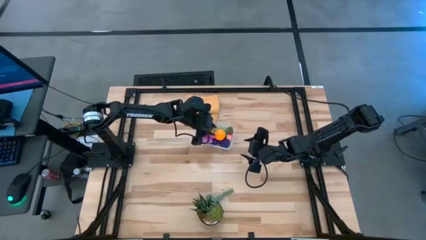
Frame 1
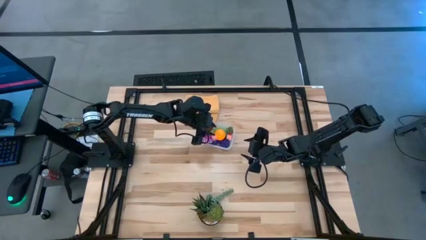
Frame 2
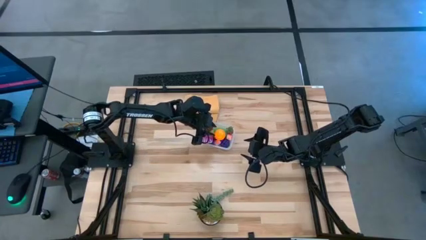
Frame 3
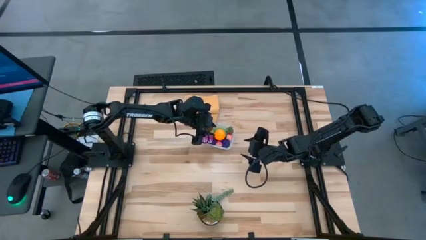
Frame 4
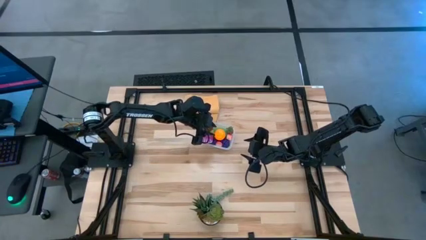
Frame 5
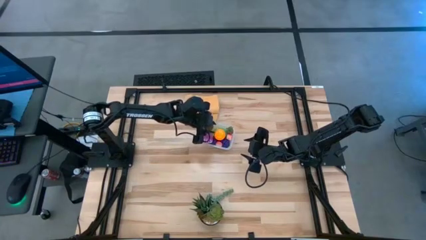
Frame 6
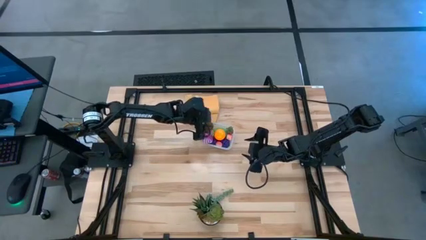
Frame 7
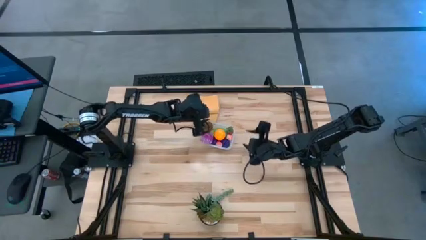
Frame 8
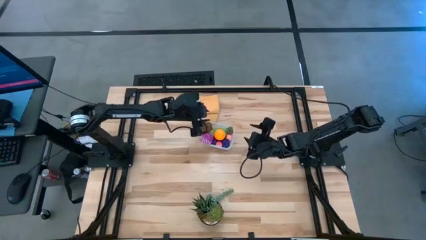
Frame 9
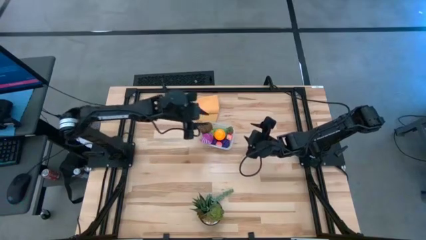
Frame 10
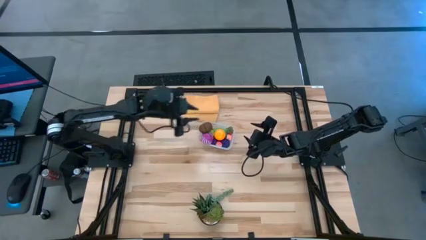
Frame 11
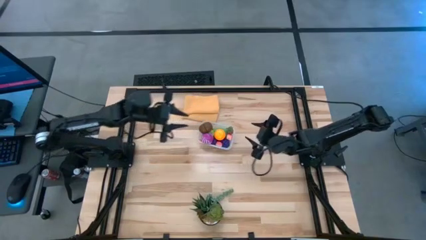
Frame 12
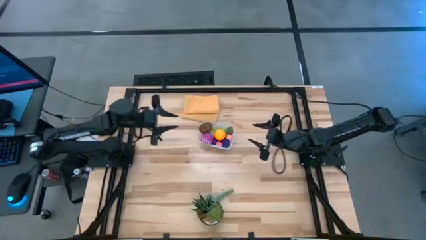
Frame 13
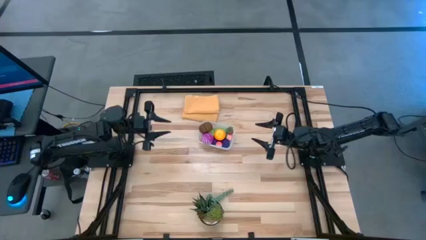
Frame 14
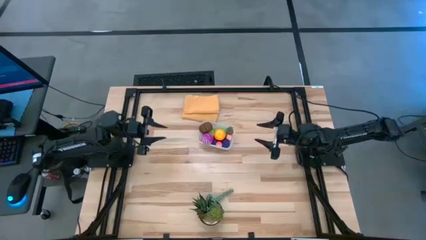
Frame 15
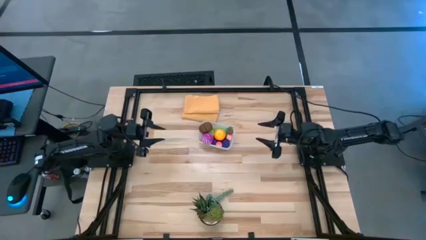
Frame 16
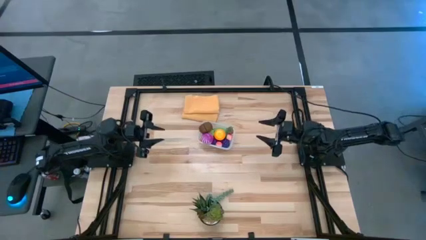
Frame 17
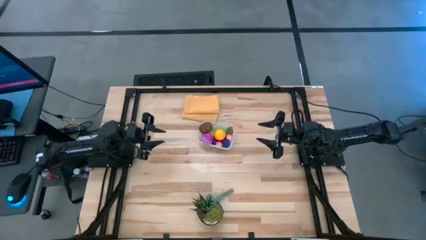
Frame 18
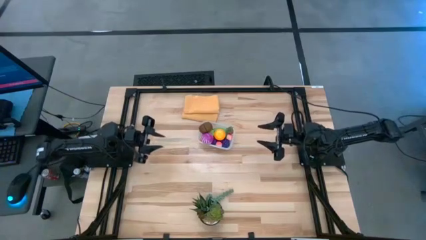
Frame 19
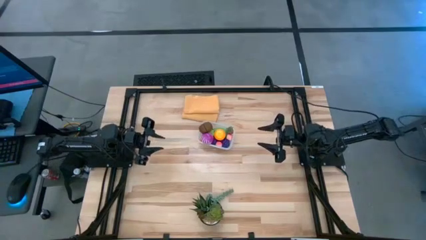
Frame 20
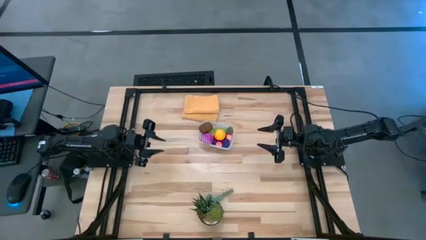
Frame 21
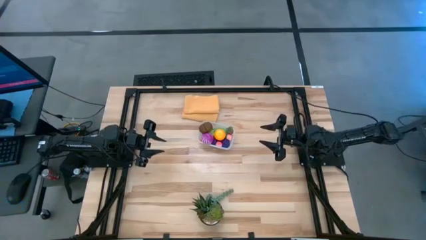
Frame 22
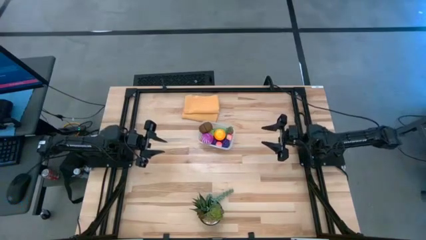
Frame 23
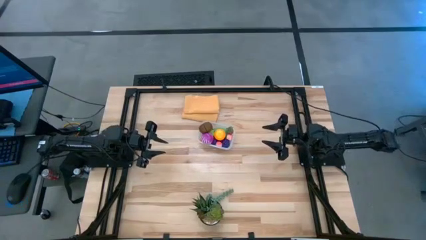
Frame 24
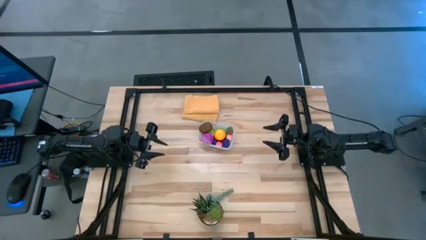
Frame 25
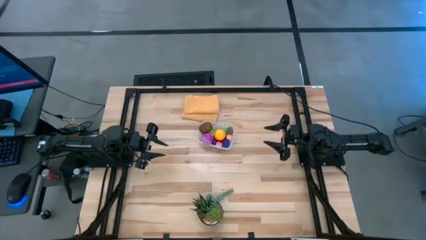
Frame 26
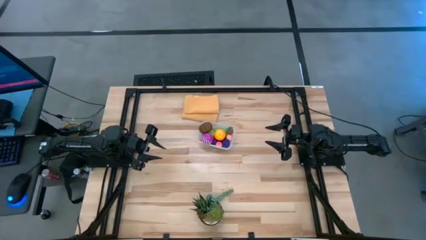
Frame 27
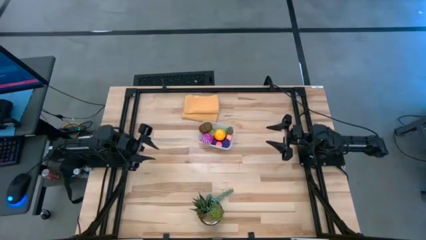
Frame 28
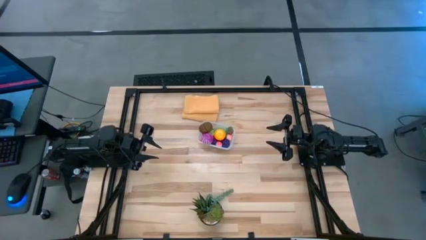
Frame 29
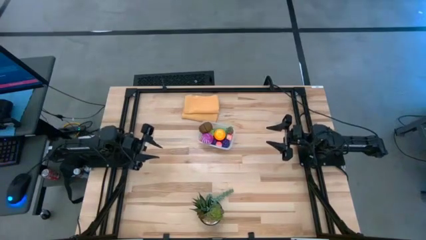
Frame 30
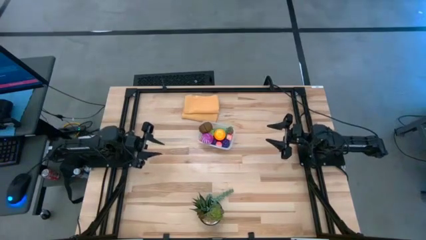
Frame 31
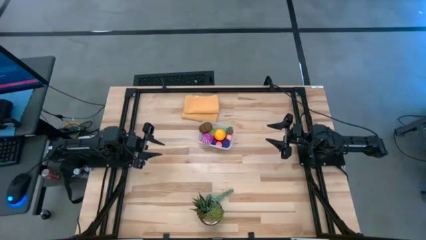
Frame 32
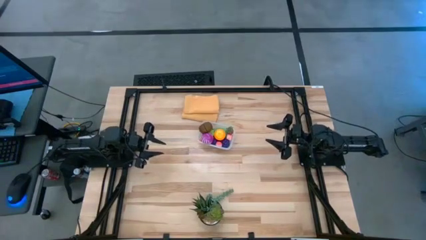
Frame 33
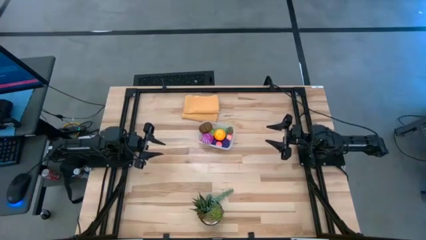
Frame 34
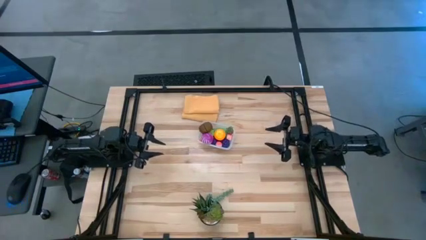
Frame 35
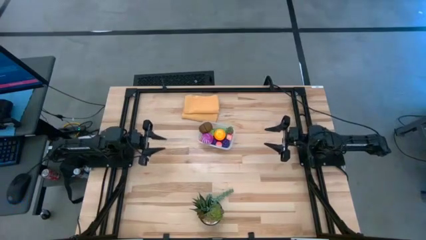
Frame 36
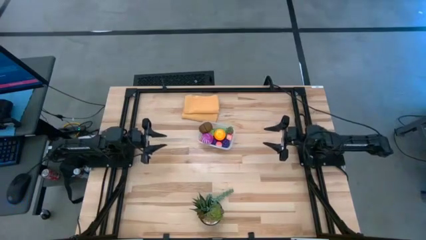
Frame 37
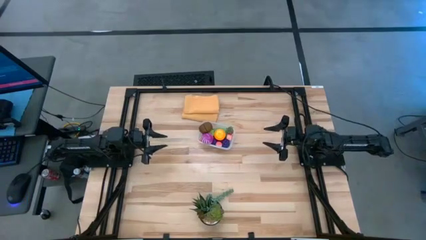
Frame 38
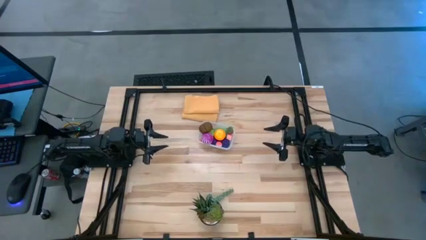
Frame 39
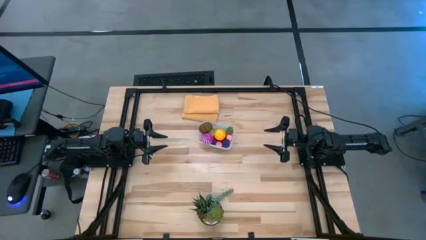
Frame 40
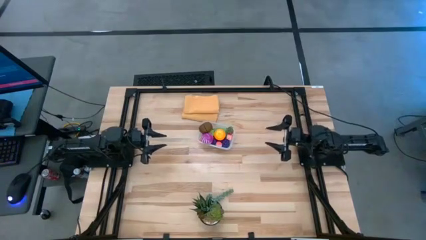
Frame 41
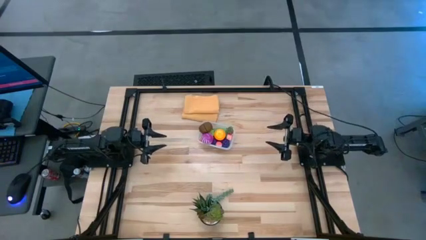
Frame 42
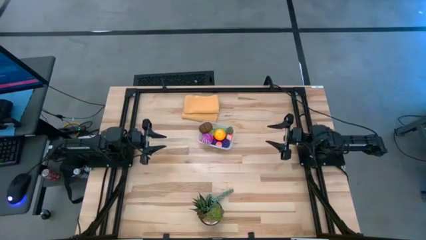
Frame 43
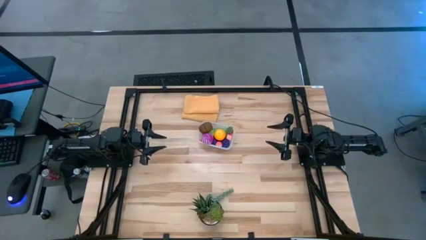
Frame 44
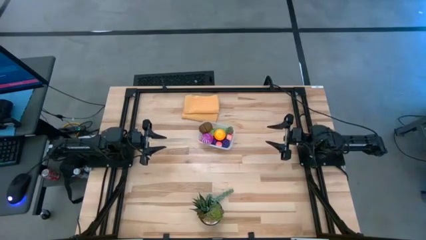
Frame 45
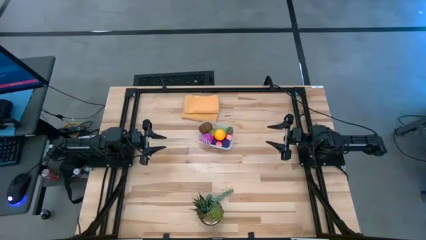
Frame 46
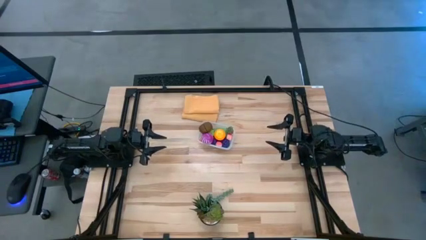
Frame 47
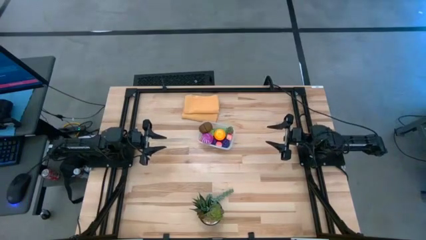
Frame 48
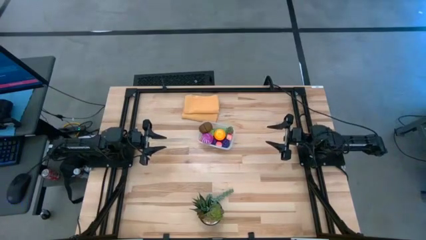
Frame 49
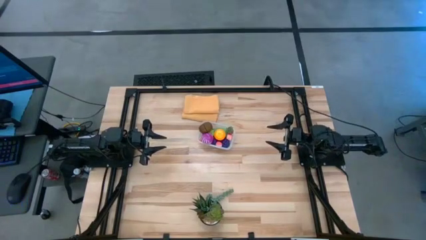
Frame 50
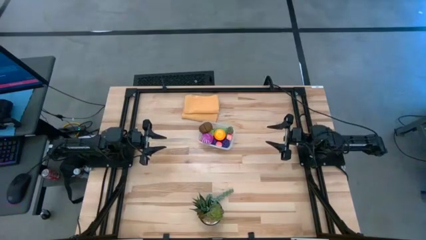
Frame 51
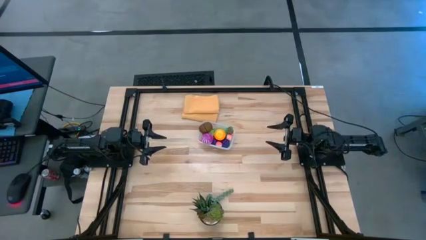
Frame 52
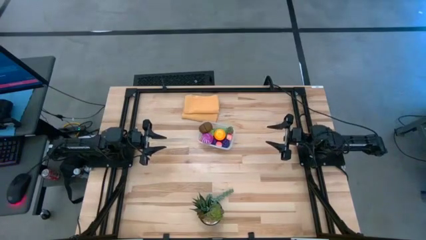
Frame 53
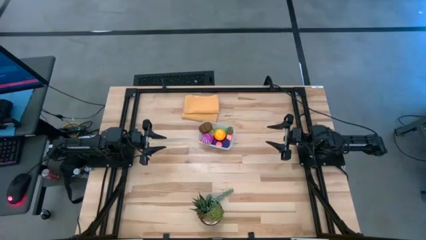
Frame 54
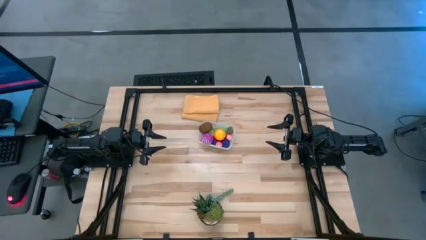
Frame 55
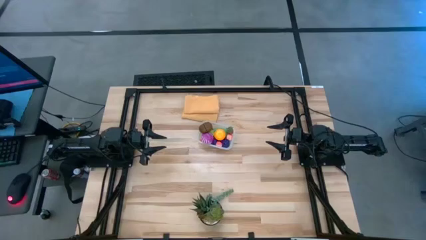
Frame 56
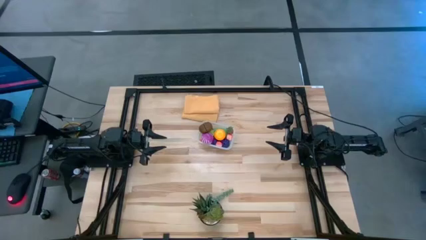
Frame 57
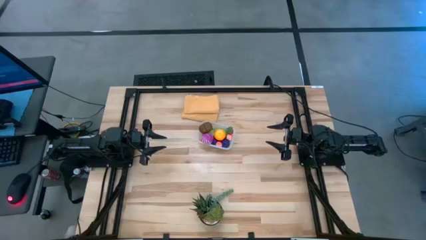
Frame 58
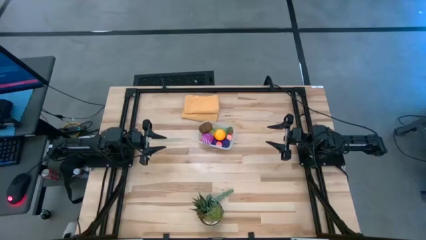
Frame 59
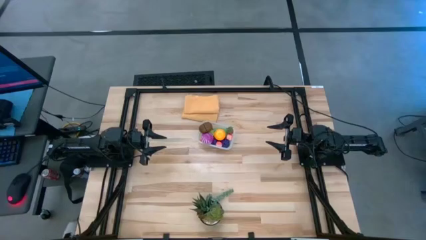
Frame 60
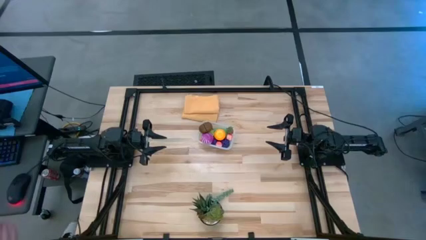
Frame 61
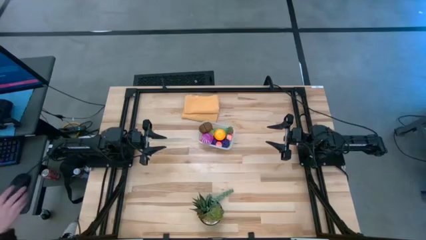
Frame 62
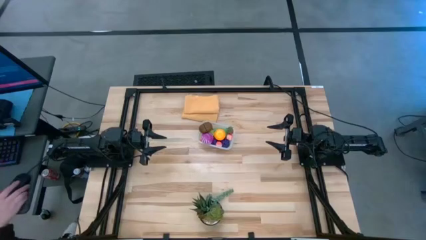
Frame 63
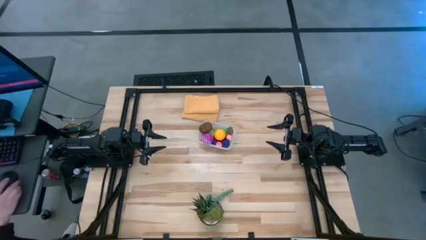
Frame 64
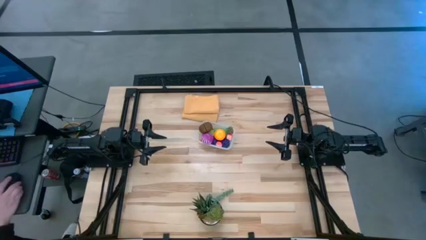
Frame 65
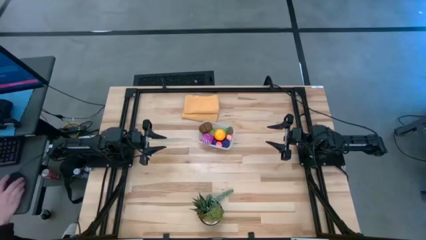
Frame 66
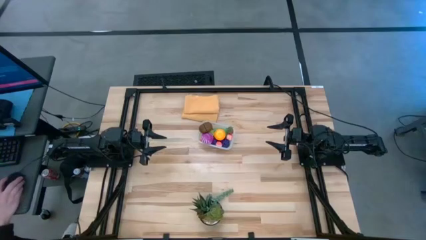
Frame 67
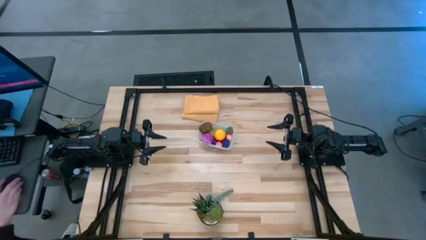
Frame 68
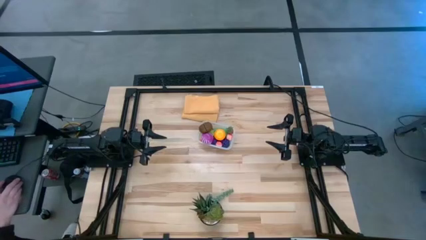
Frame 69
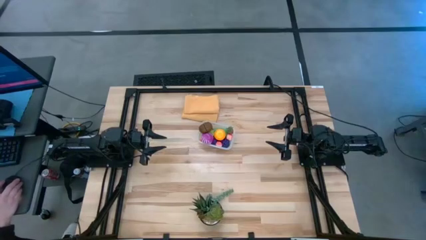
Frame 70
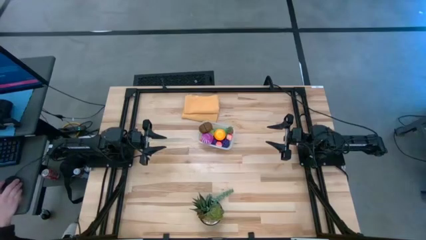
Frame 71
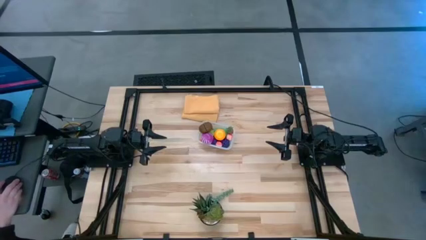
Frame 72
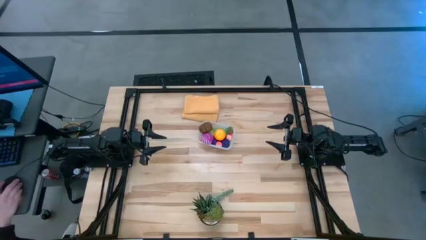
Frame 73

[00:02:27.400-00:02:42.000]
Task: Pick and placing Produce into tupperware
Return to Home Position

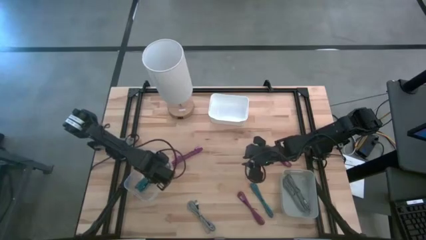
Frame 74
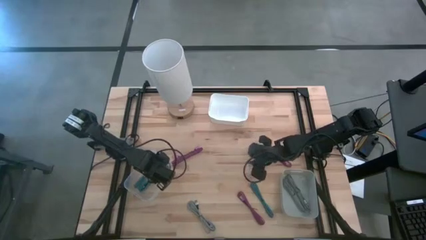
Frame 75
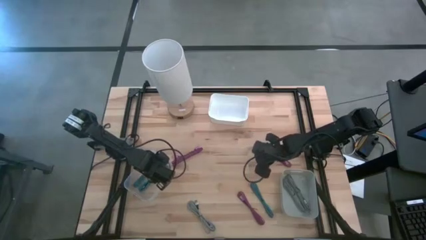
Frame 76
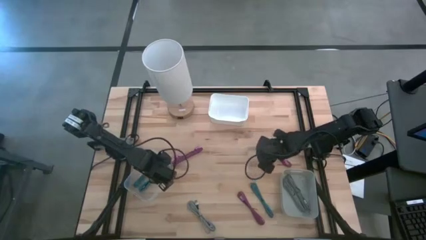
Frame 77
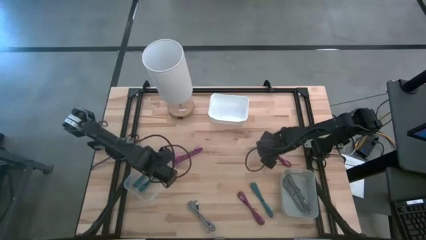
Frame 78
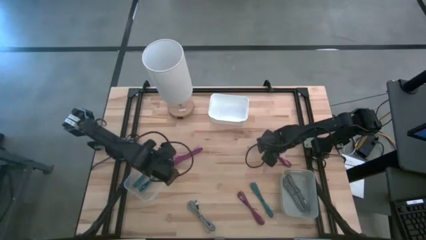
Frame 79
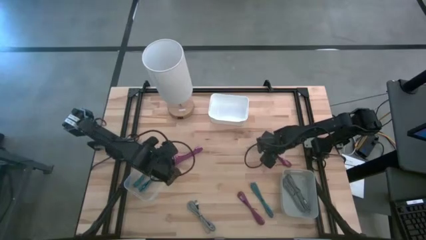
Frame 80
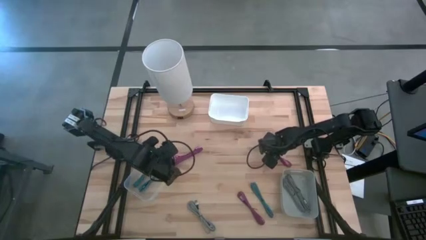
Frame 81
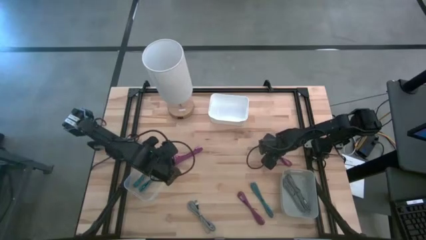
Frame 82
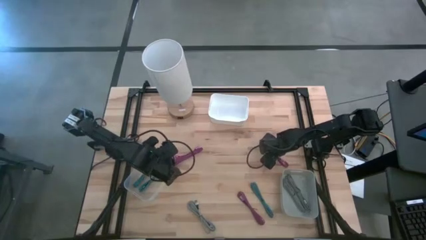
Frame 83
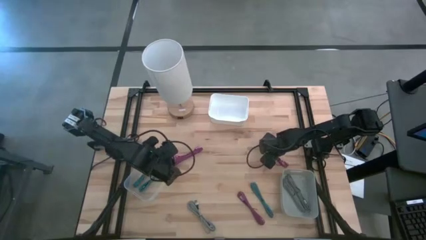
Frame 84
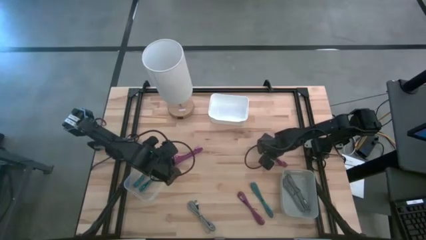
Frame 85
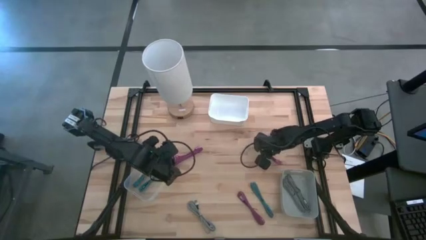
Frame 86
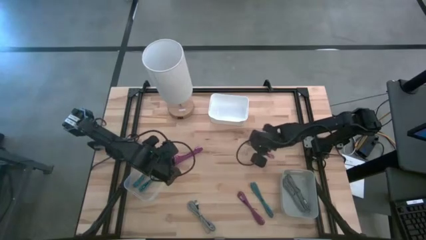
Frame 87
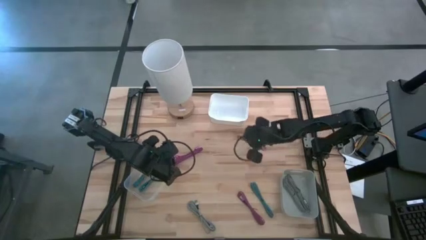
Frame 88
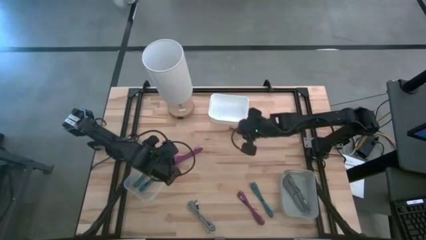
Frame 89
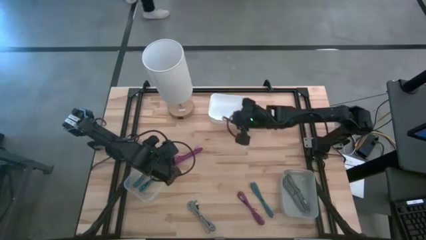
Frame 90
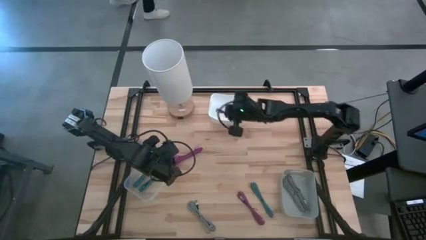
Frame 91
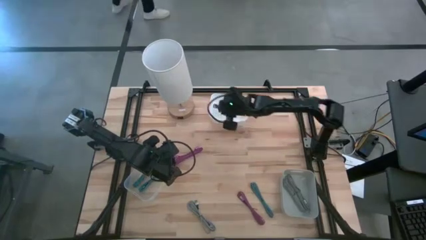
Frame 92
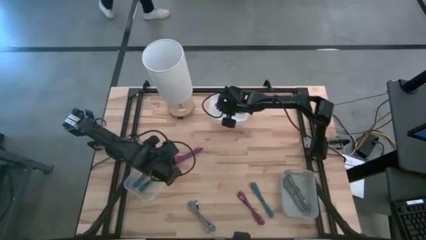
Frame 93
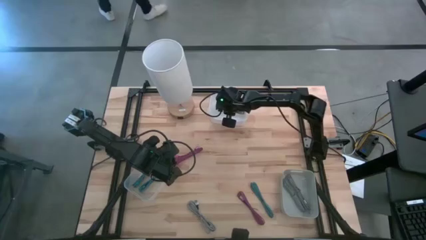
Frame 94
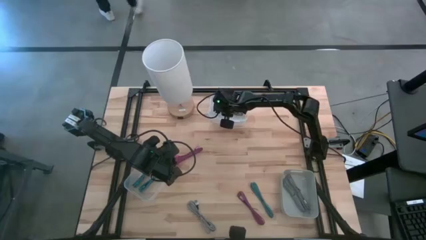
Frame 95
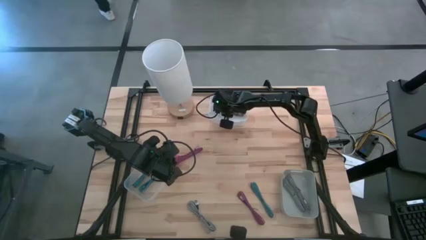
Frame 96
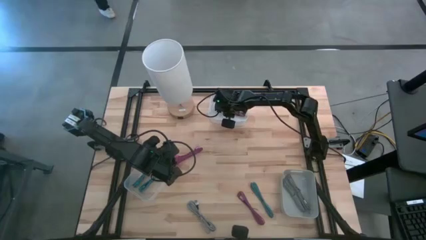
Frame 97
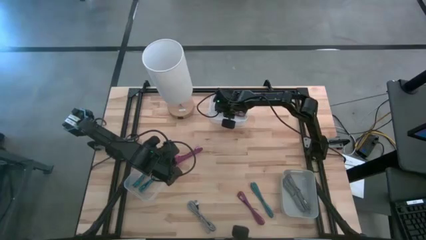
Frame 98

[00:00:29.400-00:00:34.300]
Task: Pick & Place USB Port
Put the top right pink charger cable into the white bin
